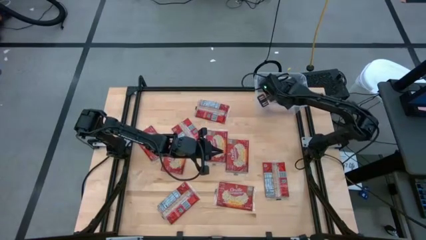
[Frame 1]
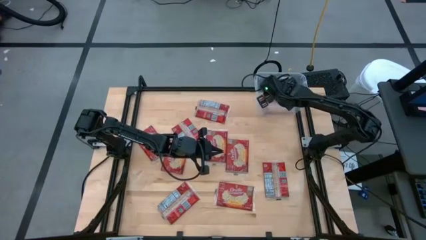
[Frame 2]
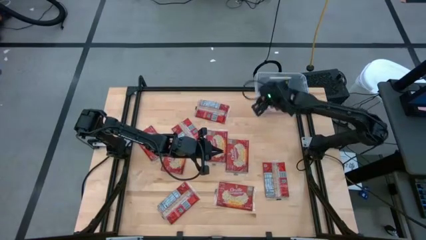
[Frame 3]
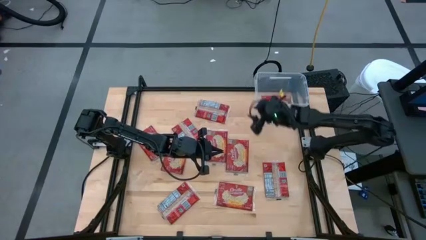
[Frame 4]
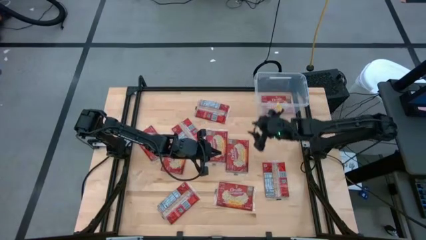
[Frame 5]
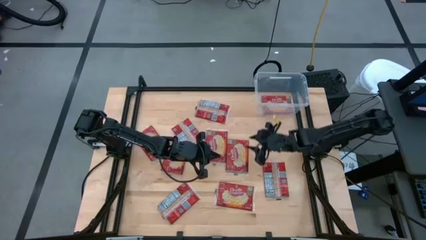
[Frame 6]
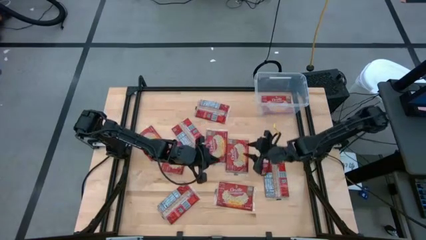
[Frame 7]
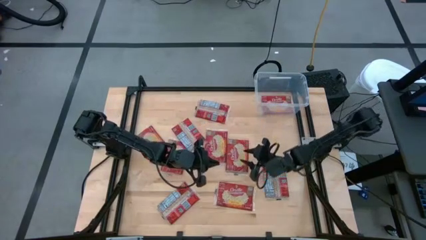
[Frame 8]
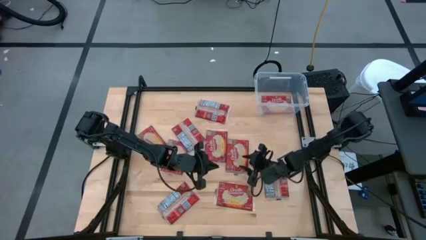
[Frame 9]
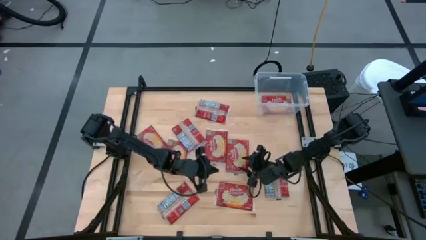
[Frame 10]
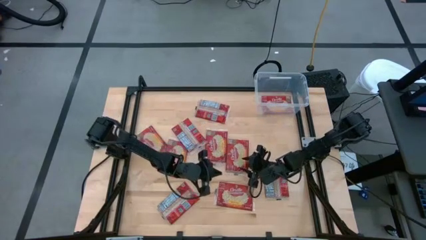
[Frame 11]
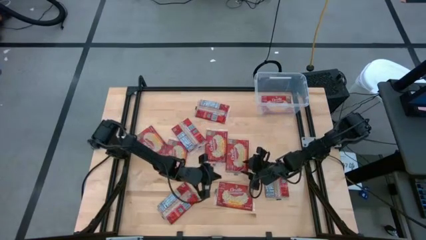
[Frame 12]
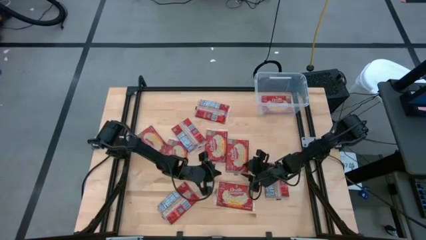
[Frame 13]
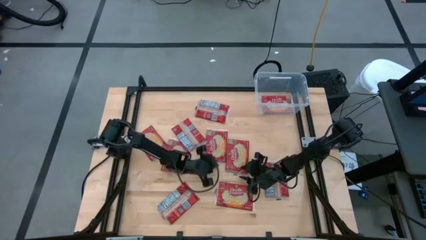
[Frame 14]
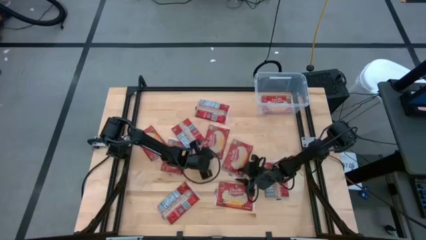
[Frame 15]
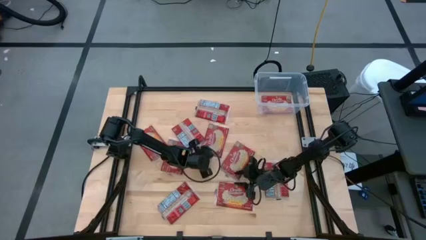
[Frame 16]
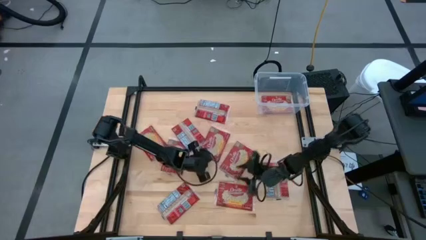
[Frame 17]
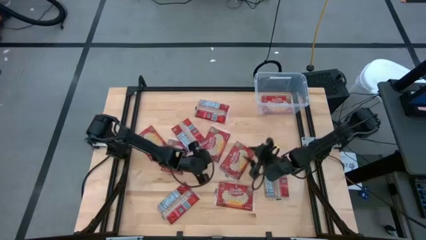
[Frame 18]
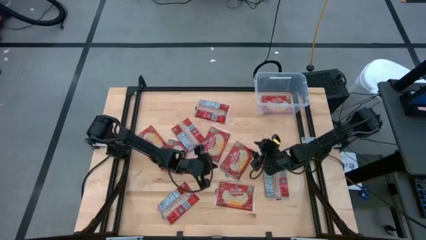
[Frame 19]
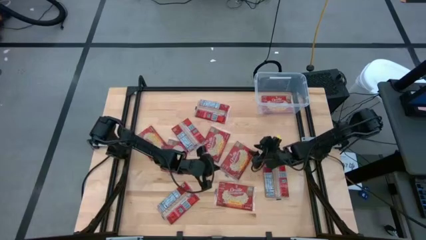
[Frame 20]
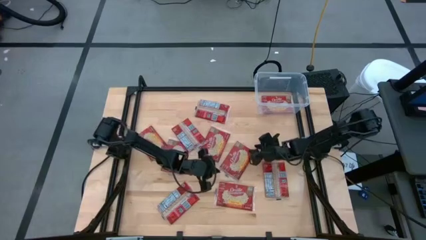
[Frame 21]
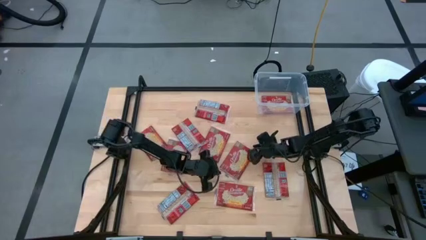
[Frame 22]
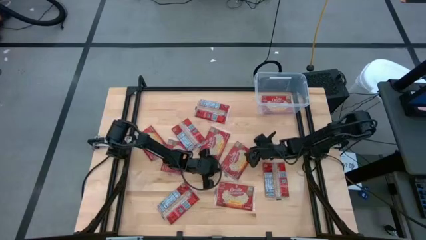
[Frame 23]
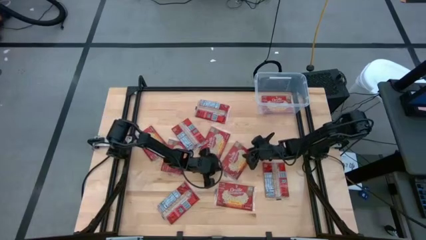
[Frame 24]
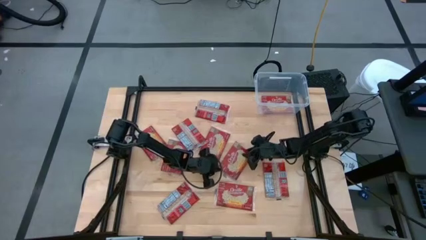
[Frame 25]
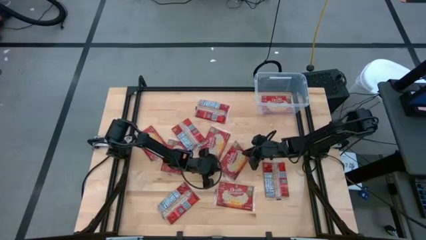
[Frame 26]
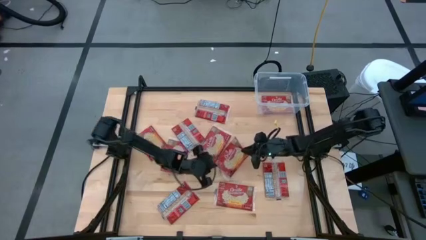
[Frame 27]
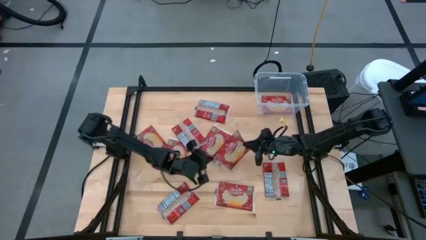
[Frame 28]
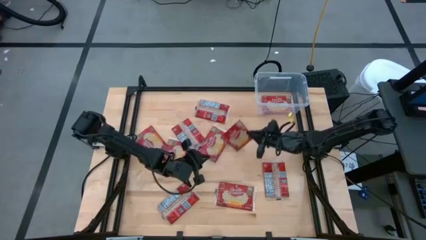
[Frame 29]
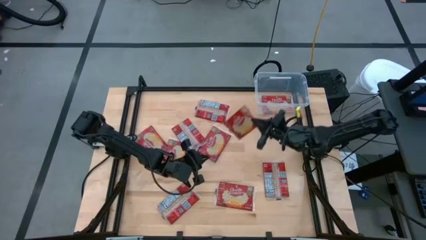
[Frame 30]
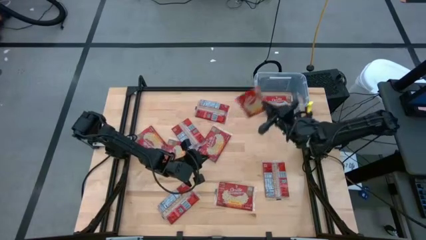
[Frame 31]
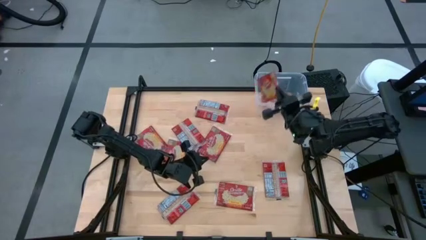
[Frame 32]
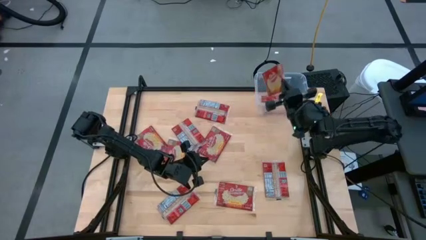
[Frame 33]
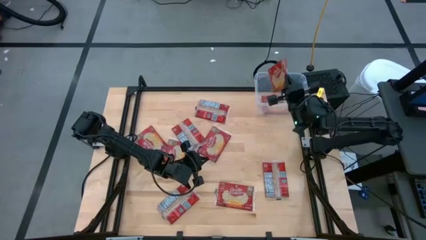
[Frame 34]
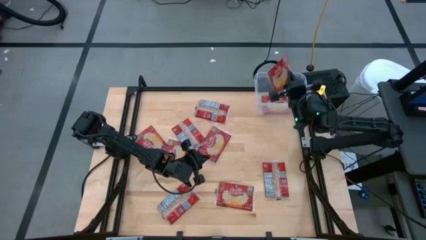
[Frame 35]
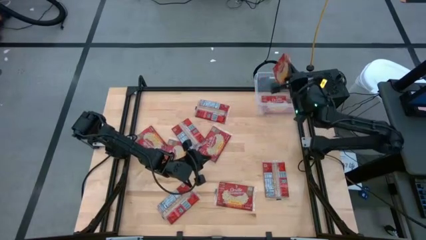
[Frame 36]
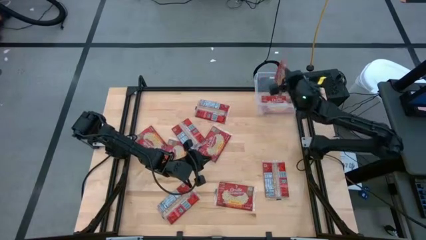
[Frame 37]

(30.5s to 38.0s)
Task: Sort popcorn bags into baskets
Put the popcorn bag into the transparent container

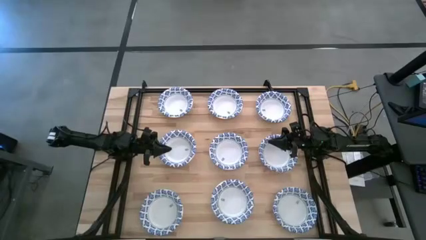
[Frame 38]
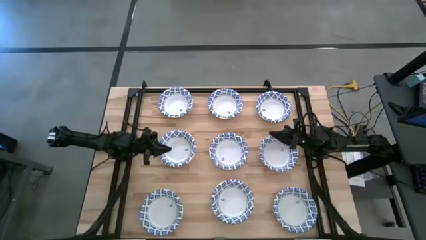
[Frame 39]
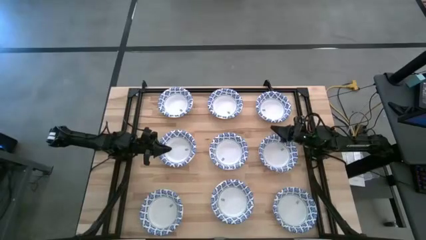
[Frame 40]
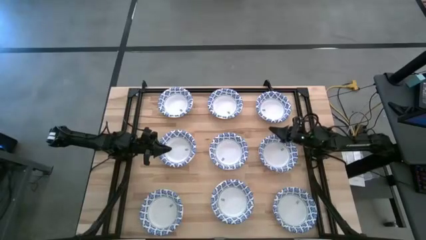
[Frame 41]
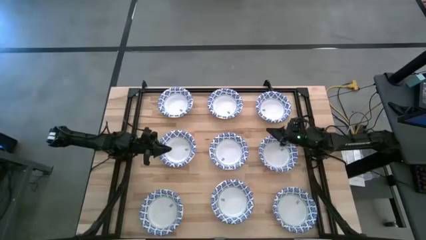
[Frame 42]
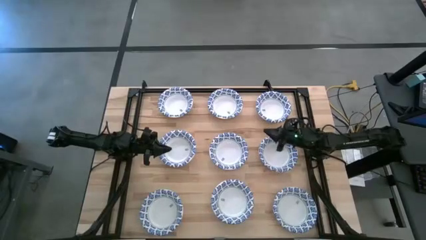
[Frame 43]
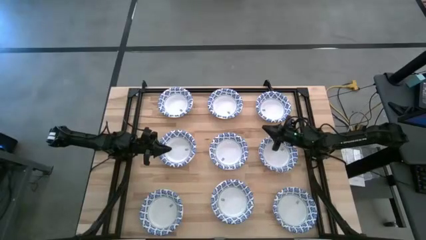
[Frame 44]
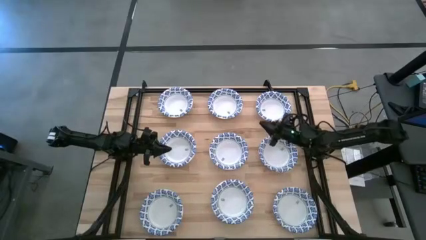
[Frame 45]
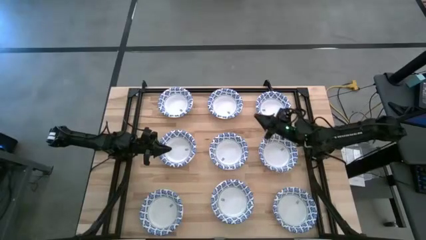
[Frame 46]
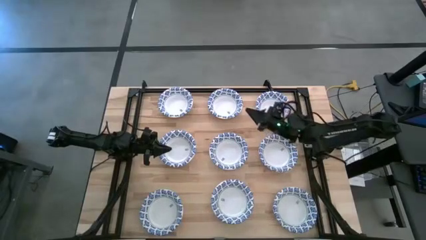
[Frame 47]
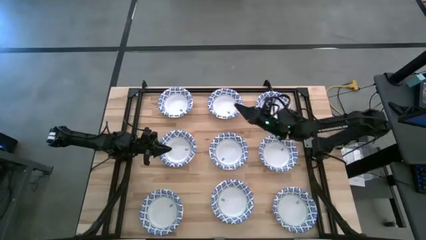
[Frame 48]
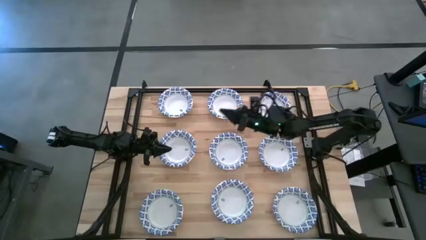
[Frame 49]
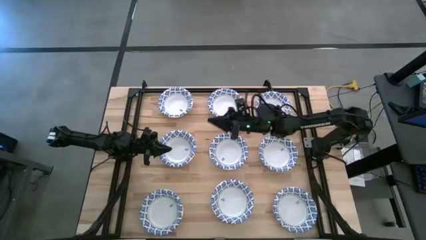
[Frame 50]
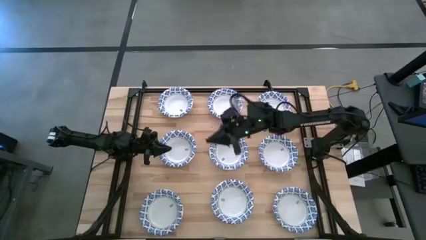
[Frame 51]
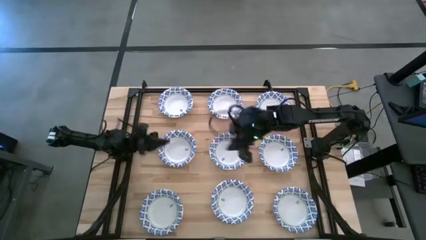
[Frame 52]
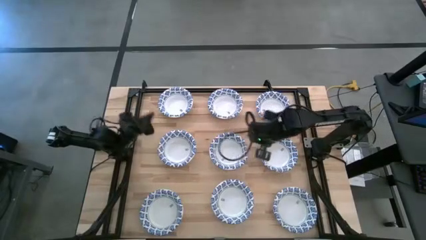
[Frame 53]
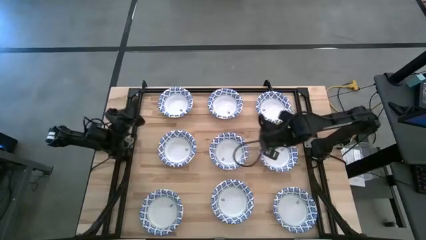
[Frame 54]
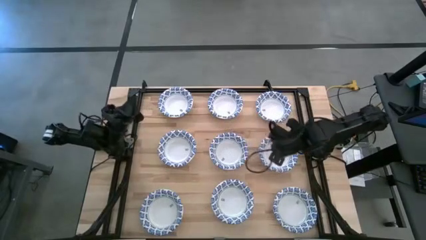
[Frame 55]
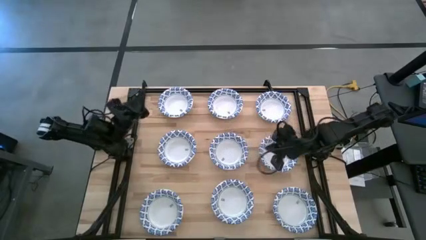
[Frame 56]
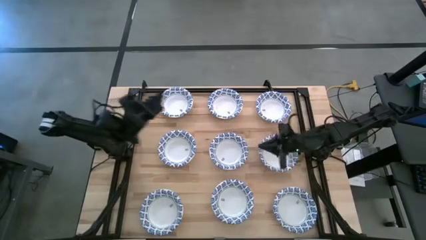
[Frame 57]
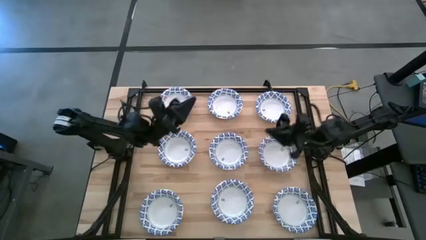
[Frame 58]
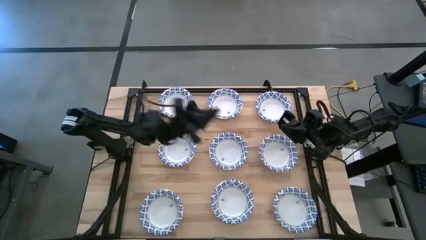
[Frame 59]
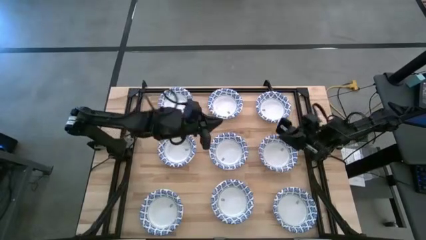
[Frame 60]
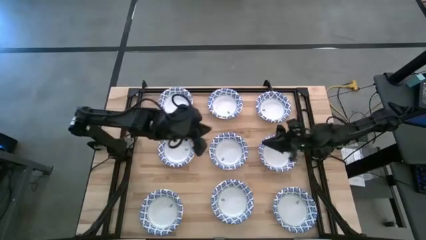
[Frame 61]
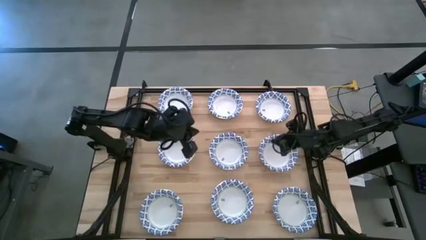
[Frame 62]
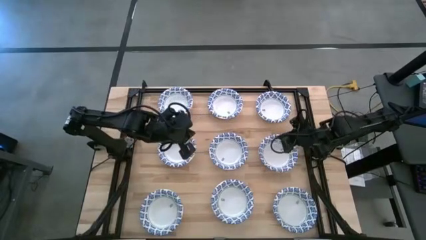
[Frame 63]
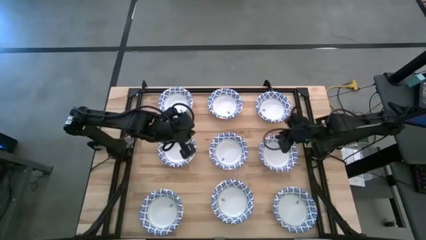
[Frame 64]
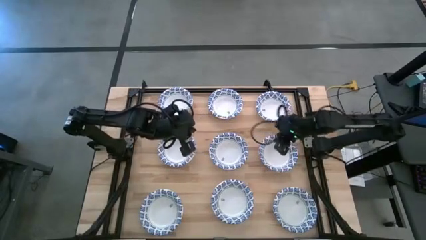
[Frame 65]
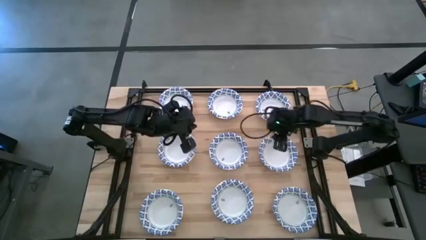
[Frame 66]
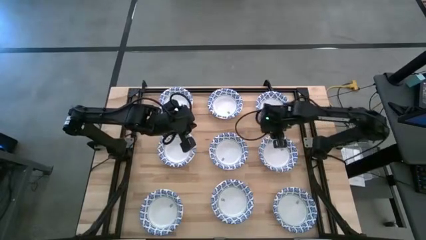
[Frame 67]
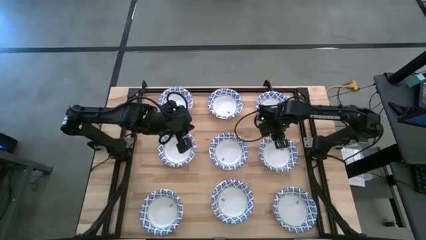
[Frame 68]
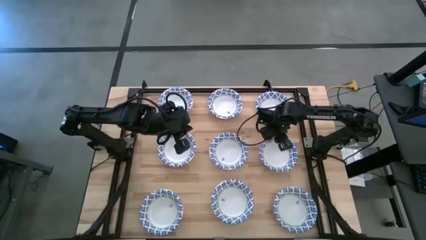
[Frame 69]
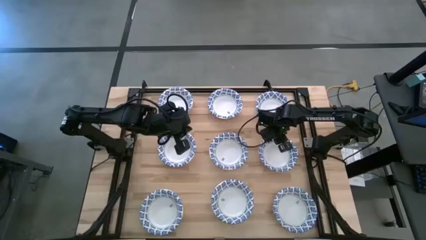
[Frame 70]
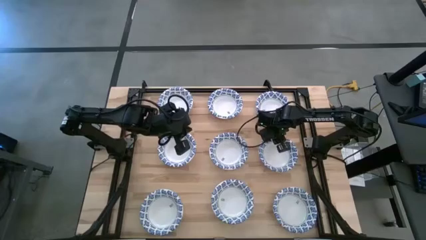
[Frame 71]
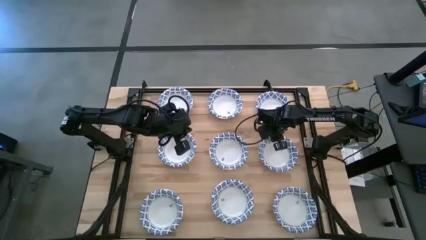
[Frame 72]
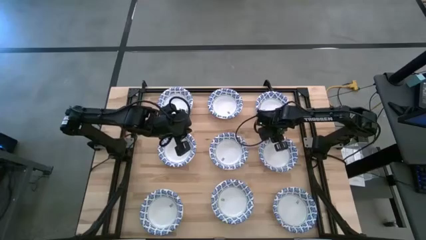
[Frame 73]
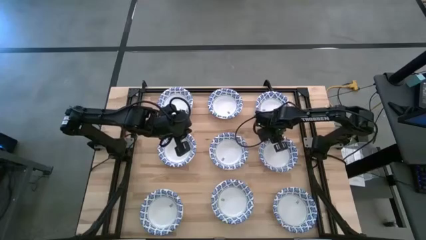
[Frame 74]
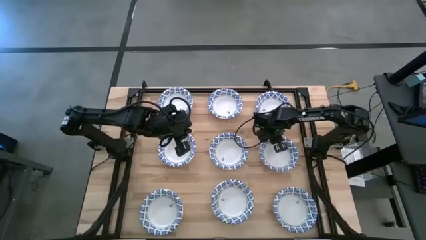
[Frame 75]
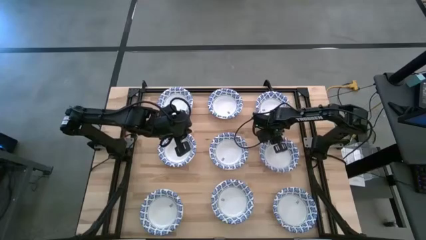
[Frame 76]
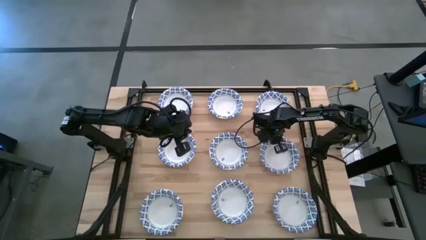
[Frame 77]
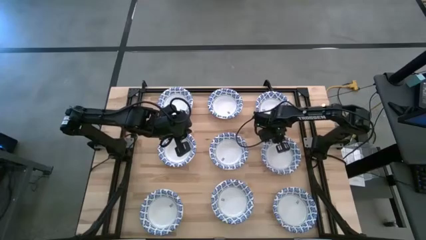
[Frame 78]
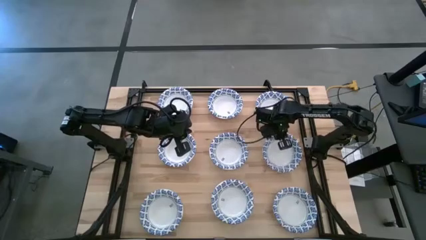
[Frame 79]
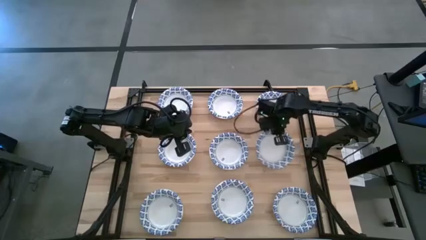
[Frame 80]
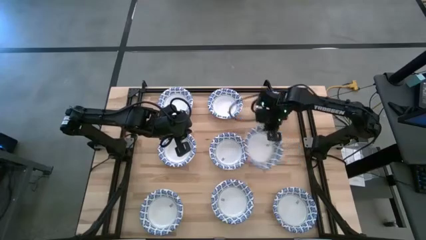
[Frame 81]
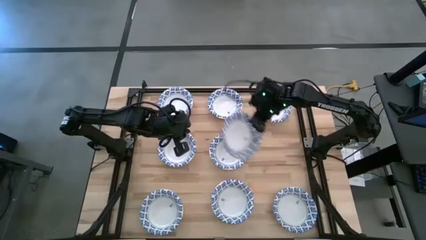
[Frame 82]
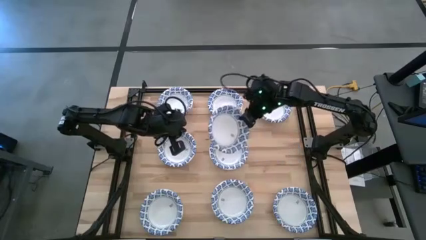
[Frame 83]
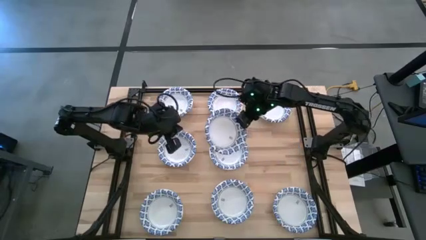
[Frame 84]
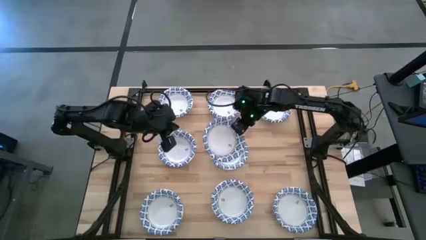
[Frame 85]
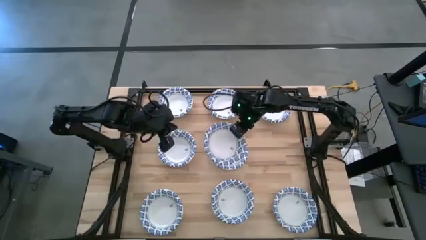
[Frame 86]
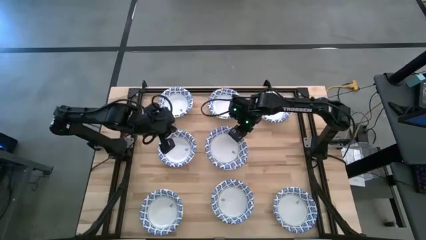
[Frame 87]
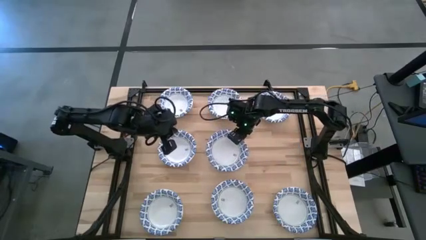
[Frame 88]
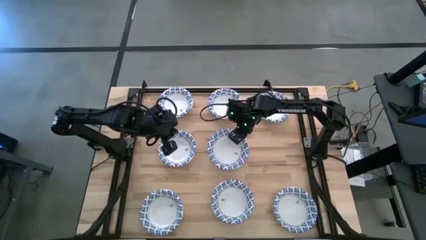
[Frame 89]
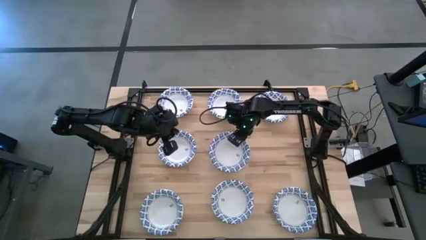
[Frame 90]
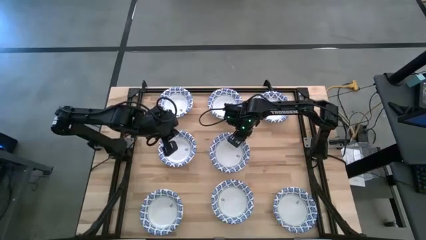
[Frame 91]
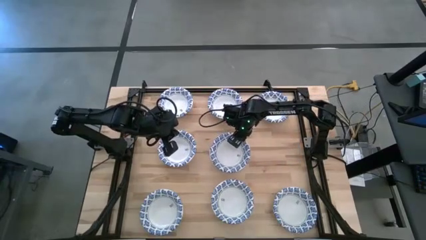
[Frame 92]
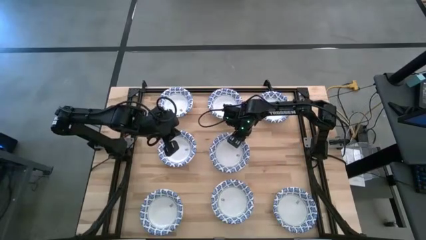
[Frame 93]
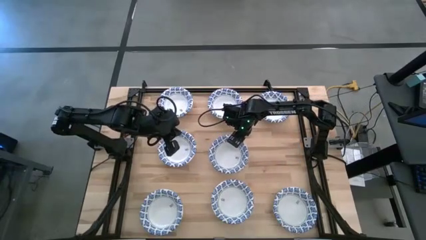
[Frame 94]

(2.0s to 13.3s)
Task: Nest bowls inside each other
Stack the white patterned bowl on top of the center white patterned bowl
